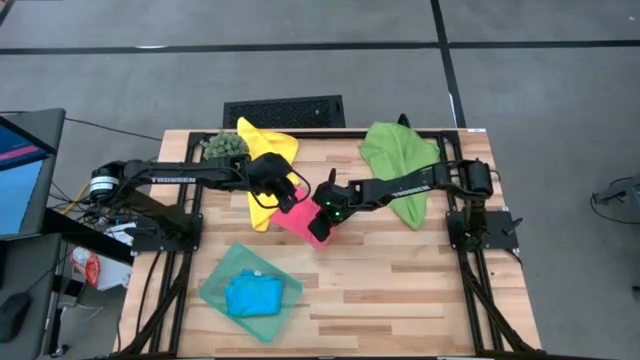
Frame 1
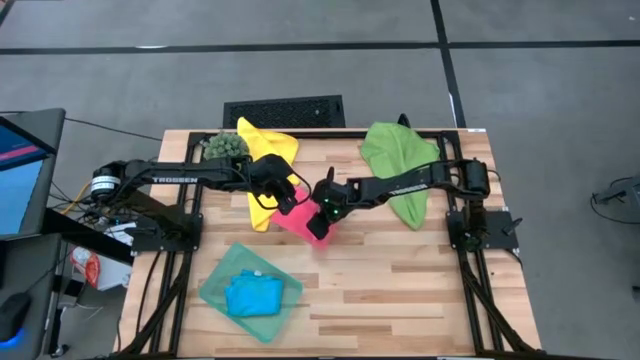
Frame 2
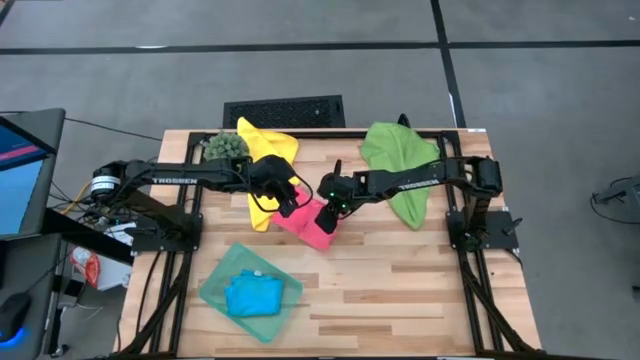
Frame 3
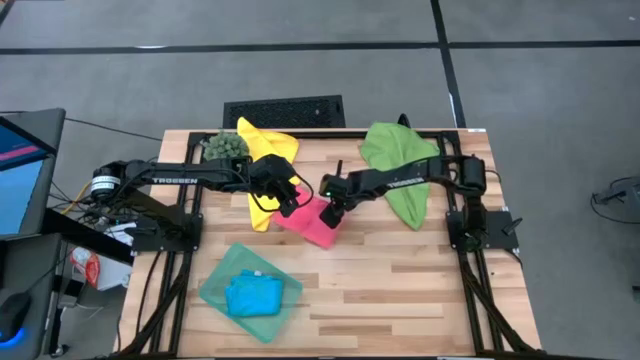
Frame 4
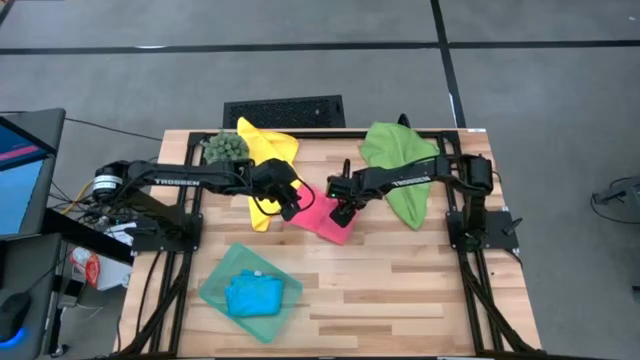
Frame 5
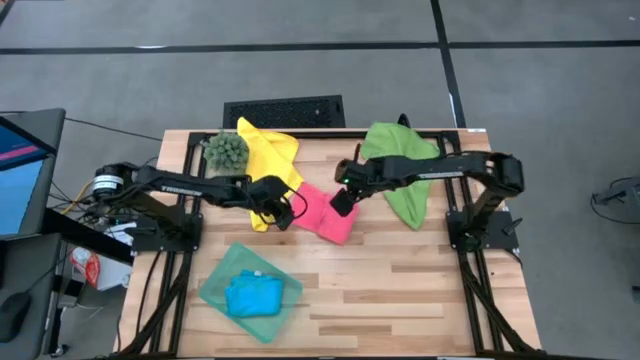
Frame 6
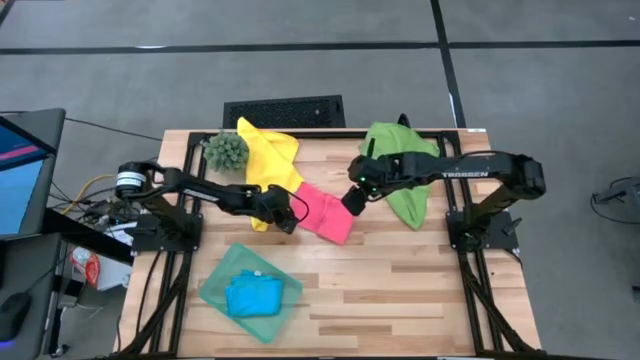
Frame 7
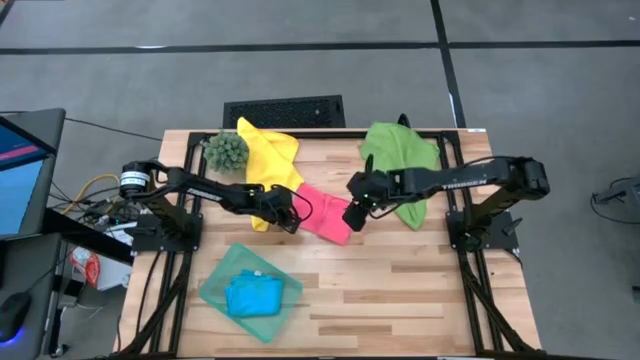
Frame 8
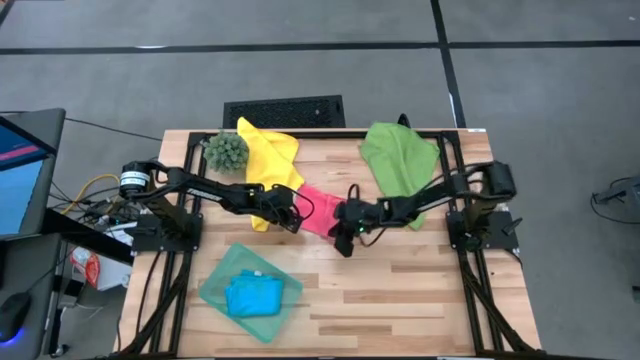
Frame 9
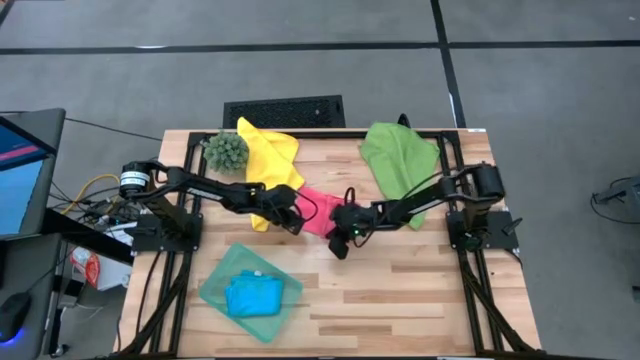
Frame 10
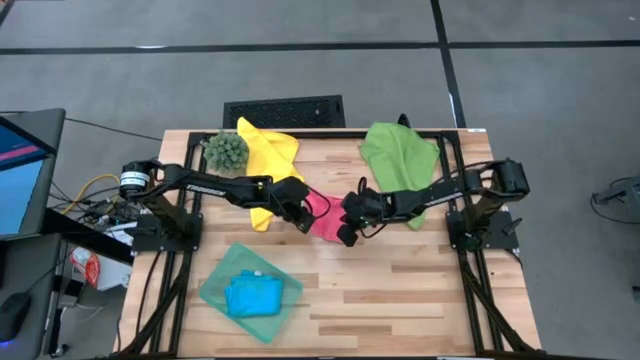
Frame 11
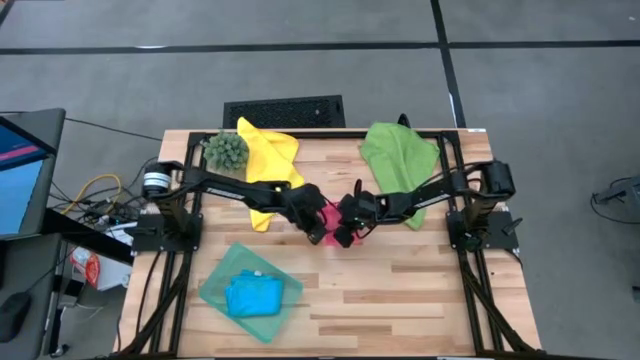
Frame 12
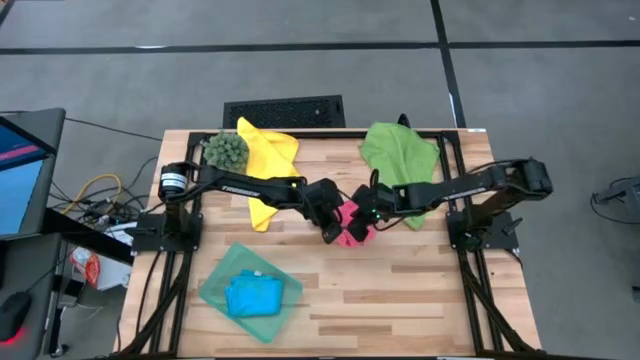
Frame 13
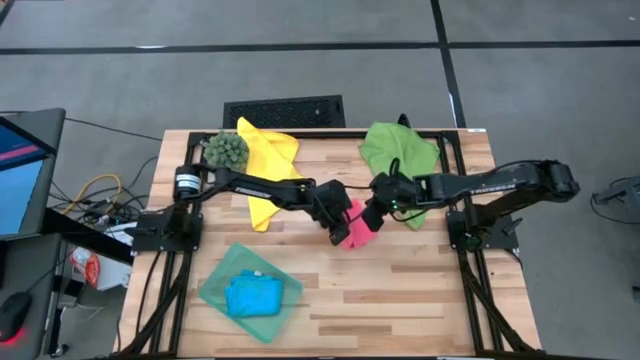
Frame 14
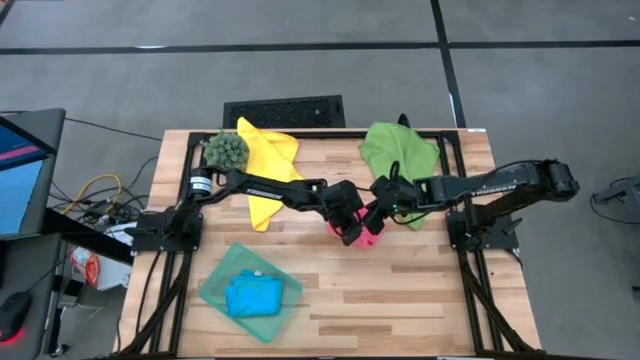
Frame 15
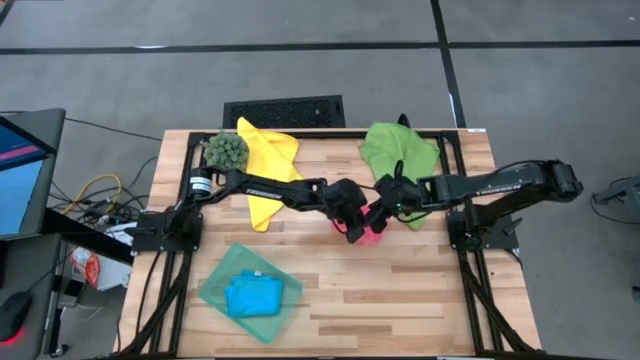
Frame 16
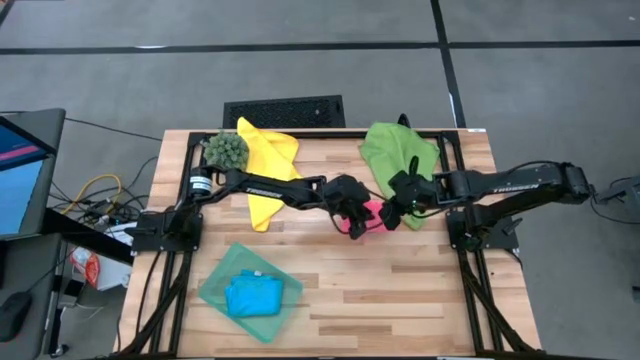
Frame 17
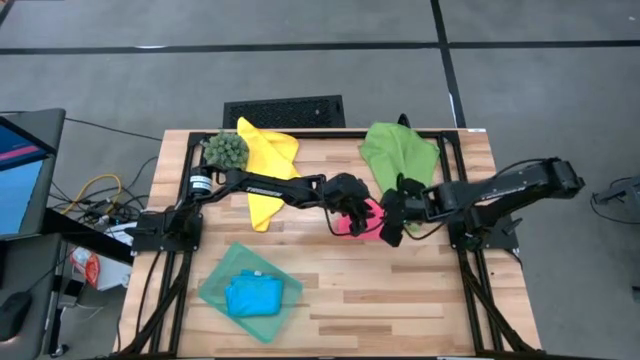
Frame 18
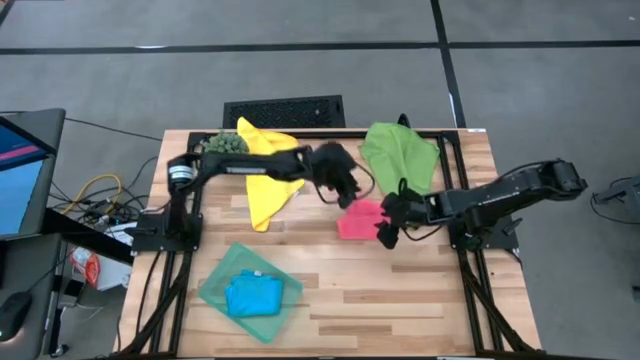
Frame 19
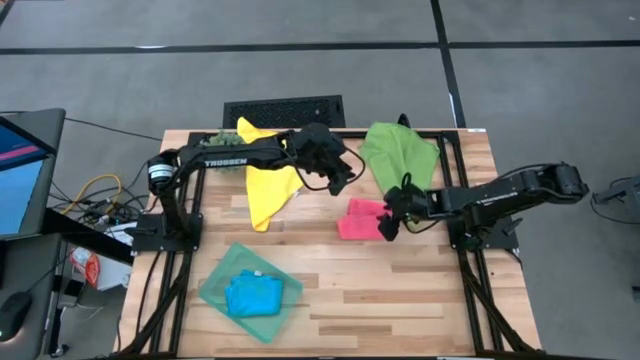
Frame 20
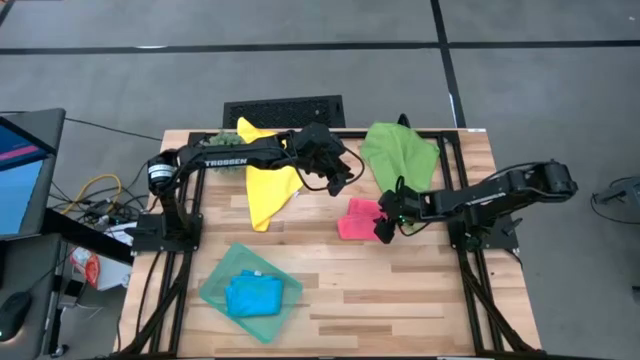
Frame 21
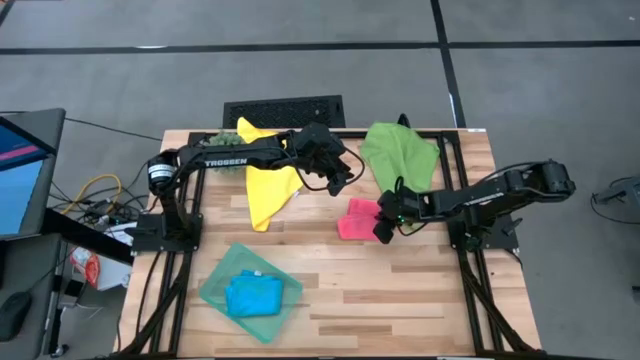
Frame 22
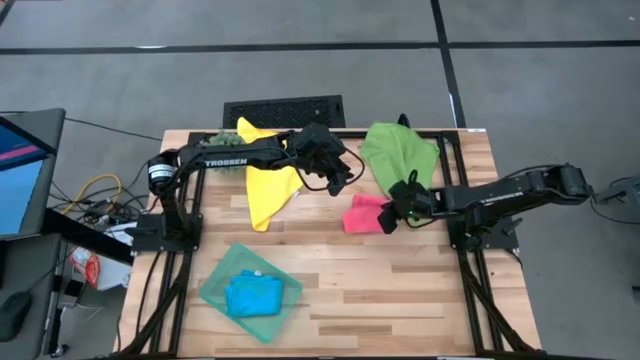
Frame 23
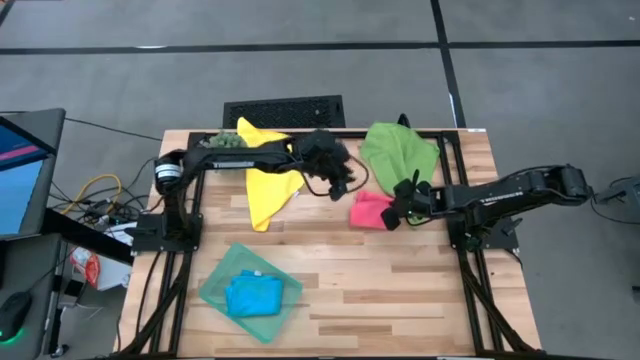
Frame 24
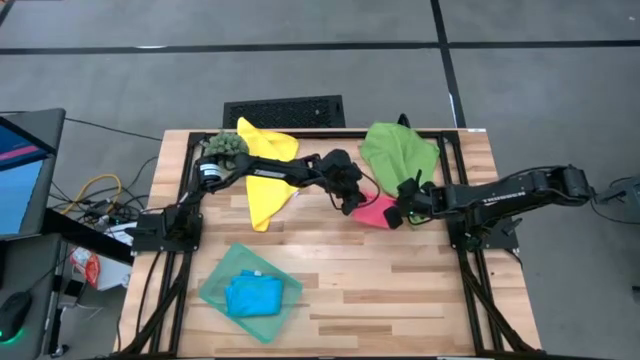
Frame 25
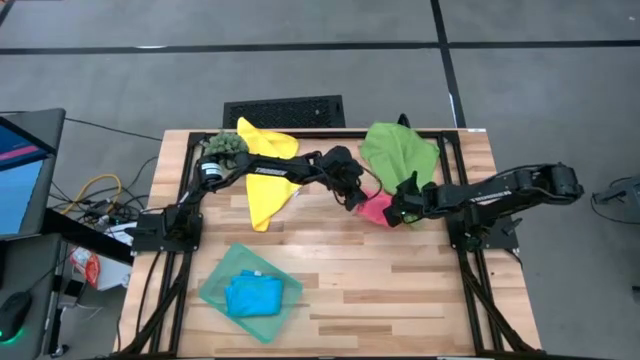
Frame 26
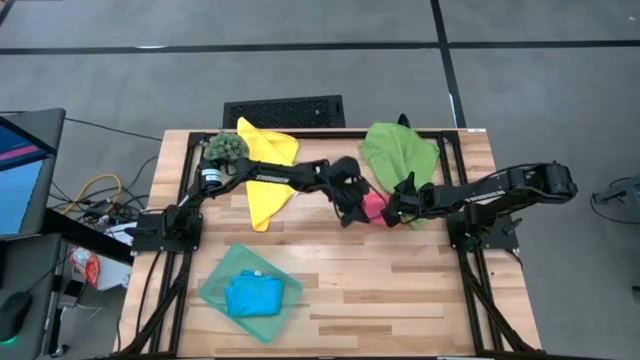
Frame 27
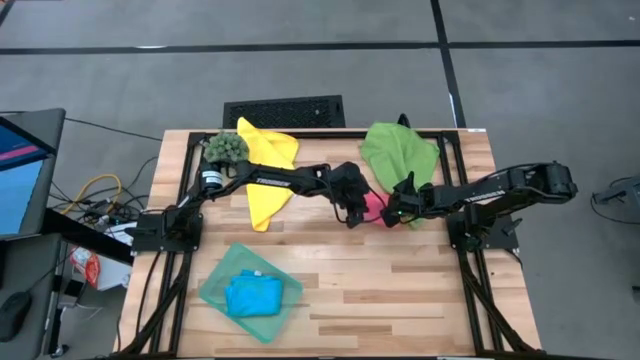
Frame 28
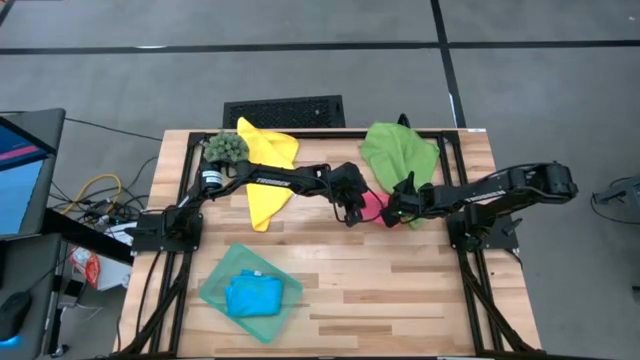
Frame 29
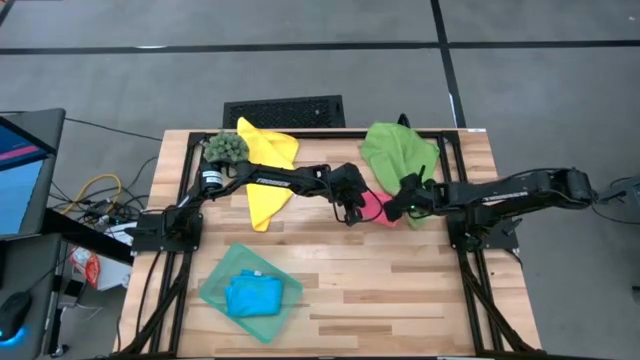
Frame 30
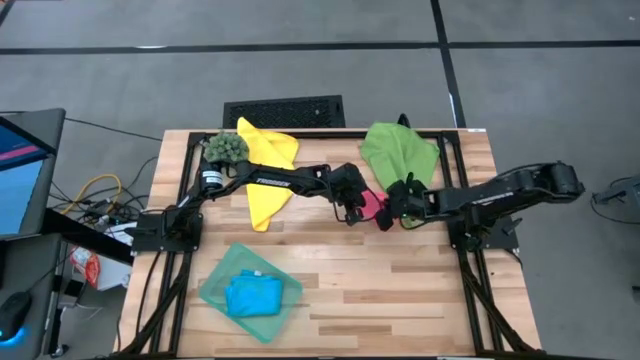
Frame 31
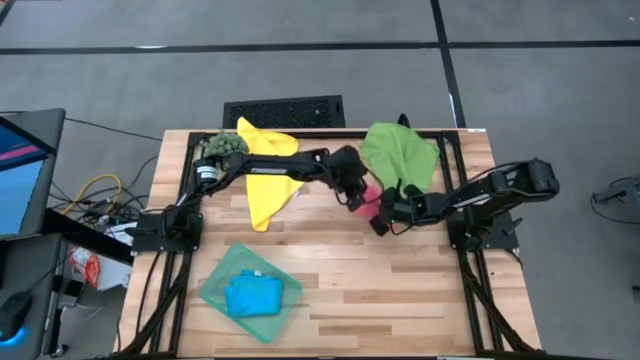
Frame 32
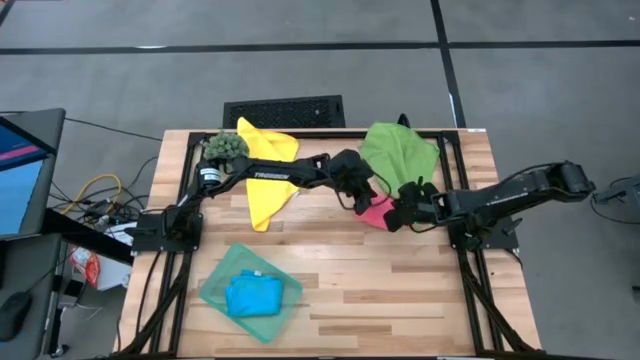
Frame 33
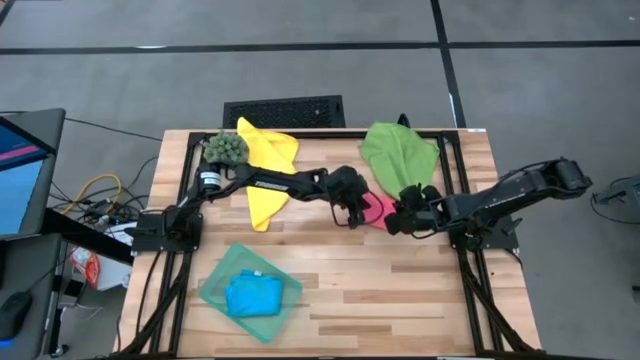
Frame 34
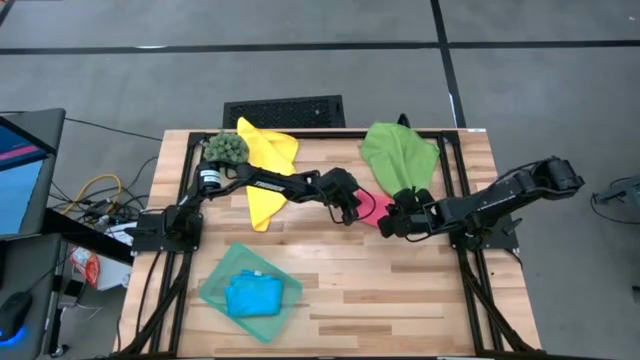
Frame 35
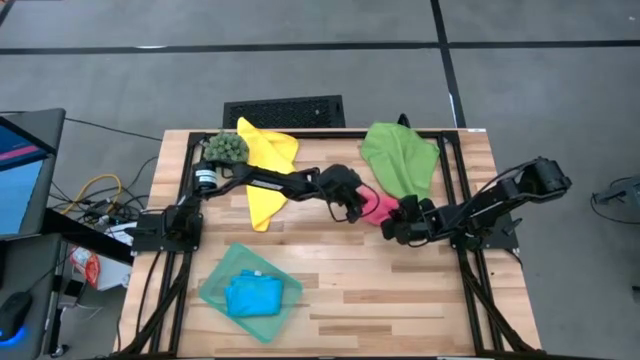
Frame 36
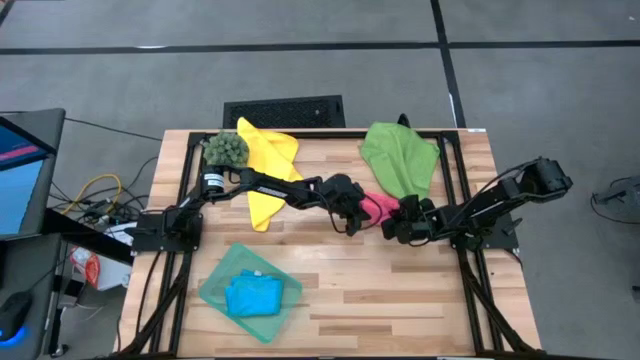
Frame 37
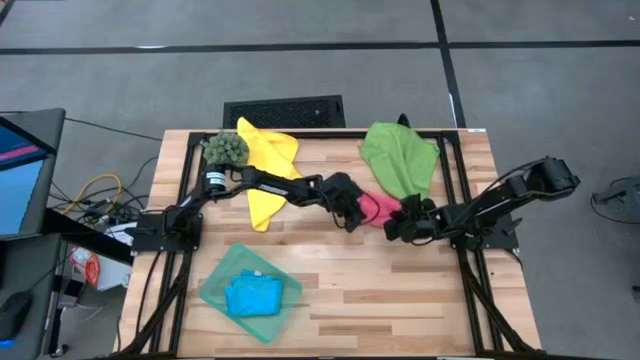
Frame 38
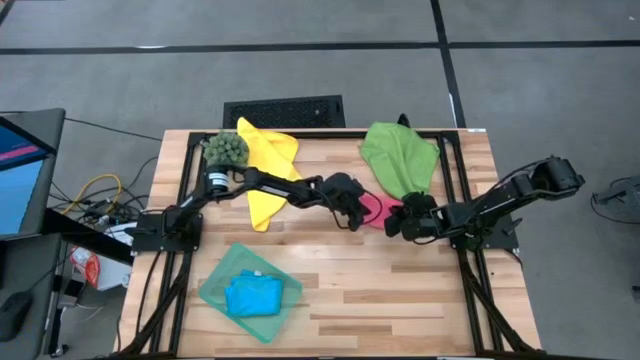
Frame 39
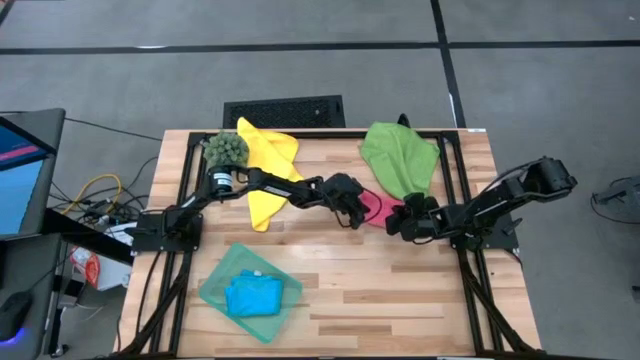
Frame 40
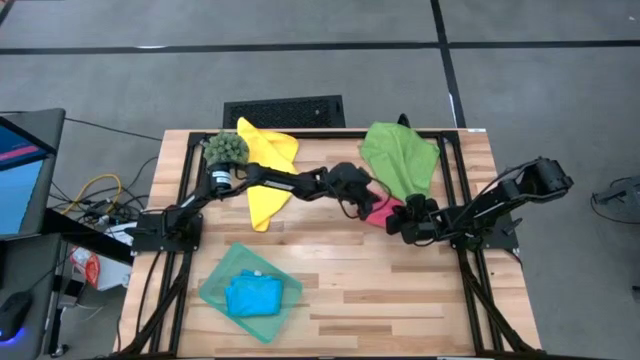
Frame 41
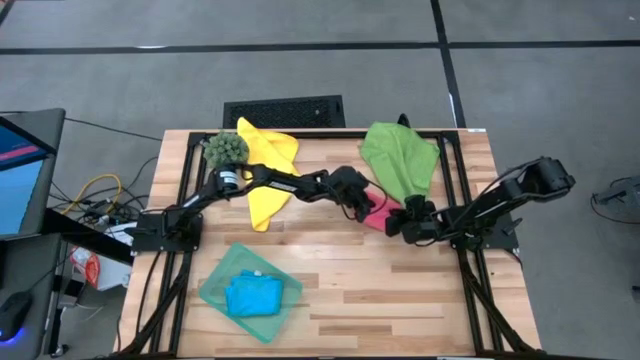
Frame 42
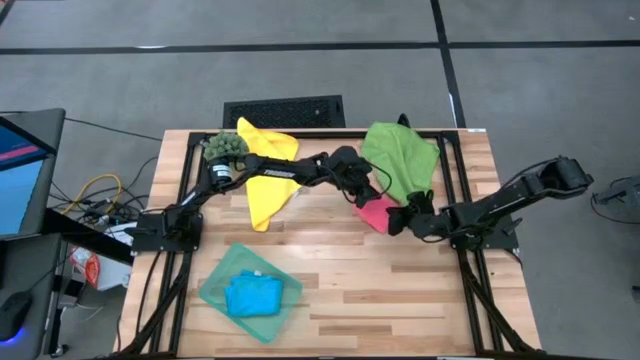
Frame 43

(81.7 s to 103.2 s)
Task: Fold microfiber towels
Fold the pink microfiber towel
